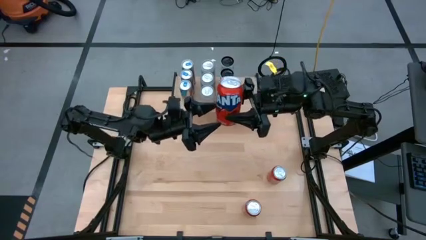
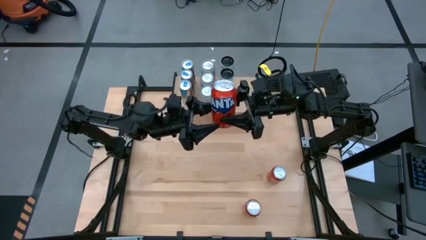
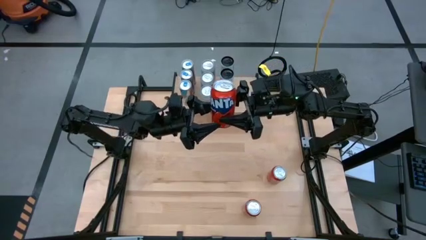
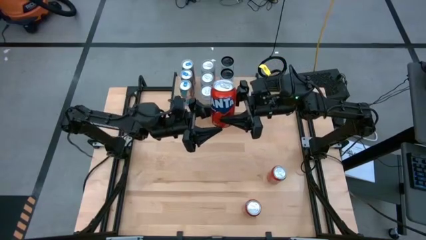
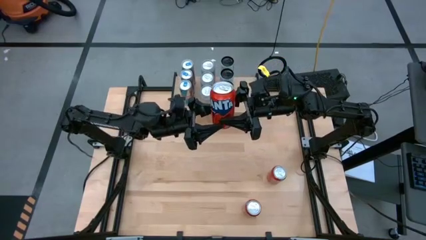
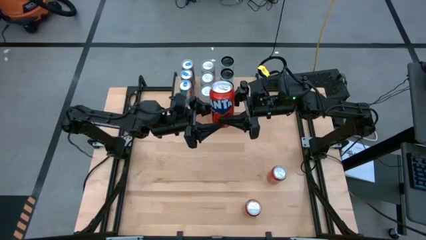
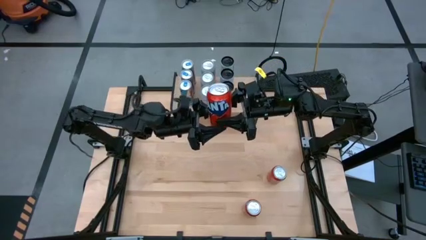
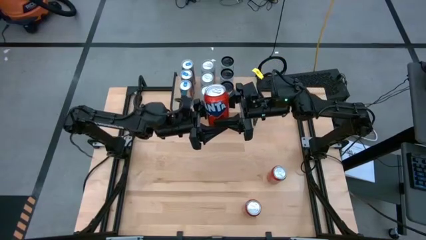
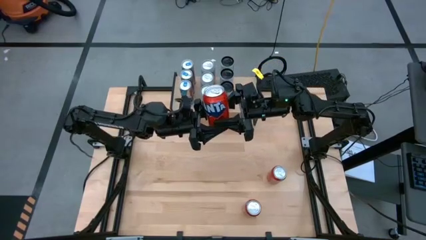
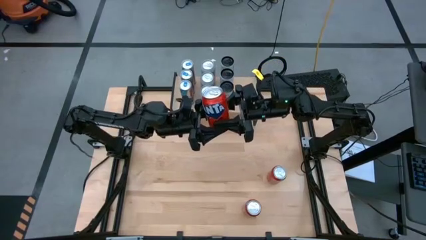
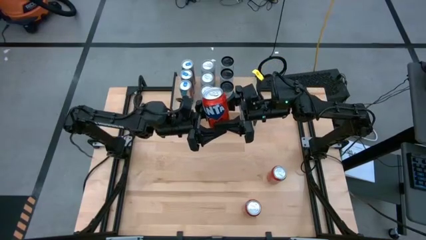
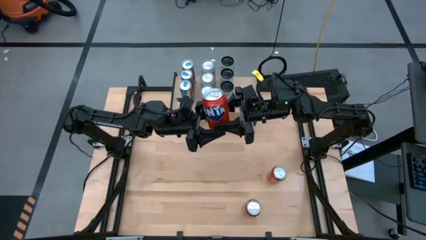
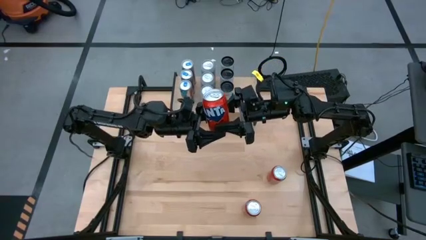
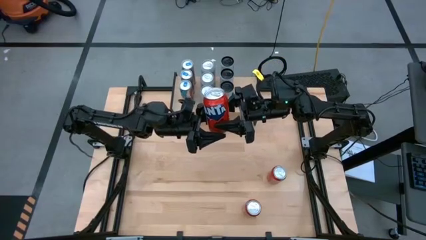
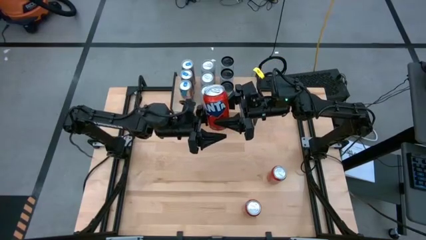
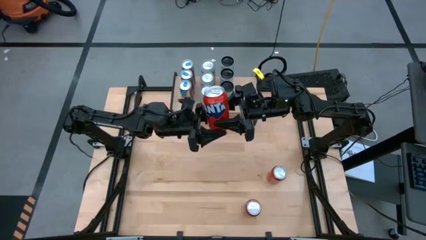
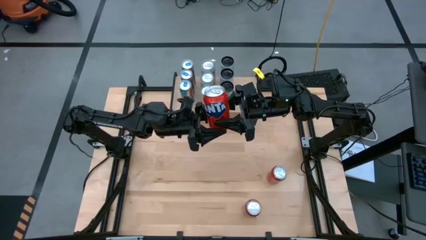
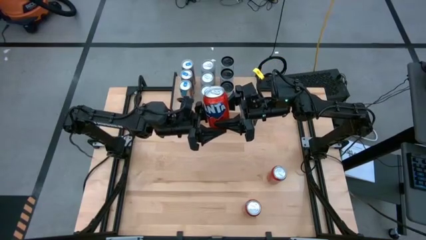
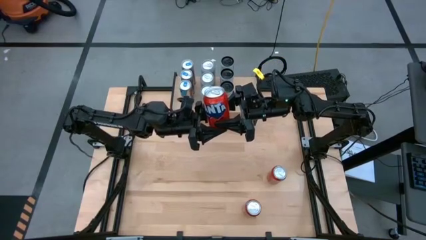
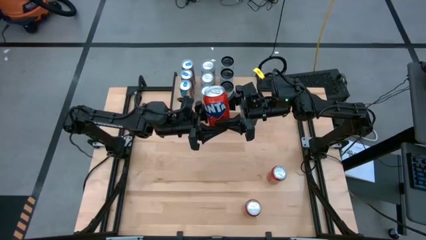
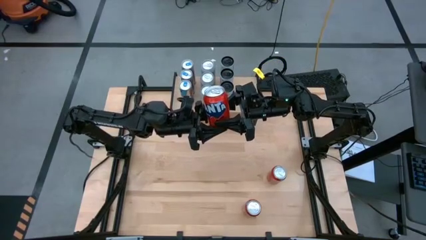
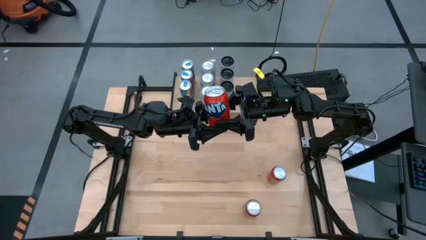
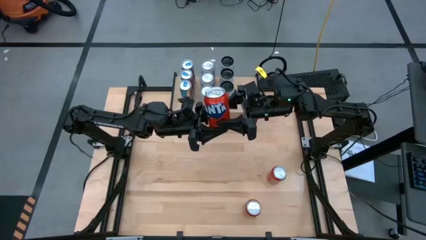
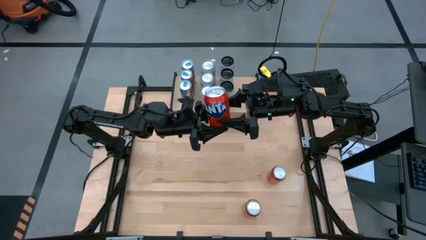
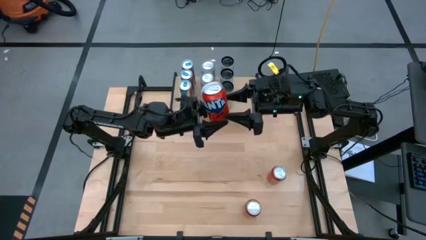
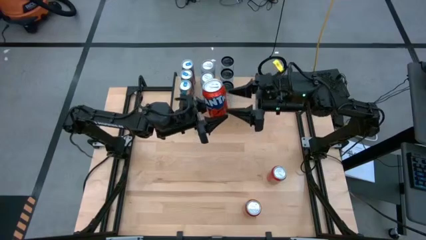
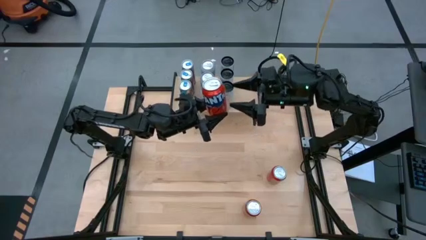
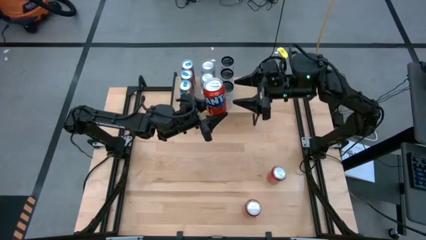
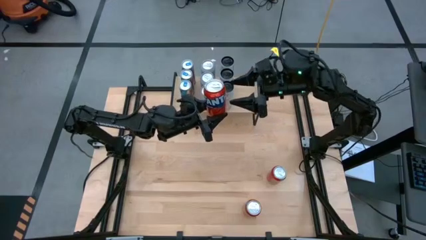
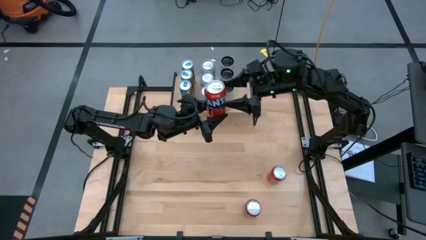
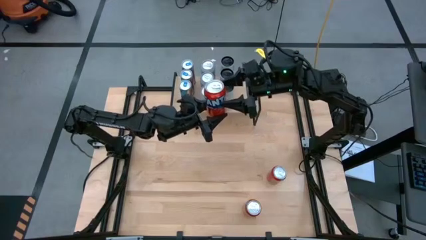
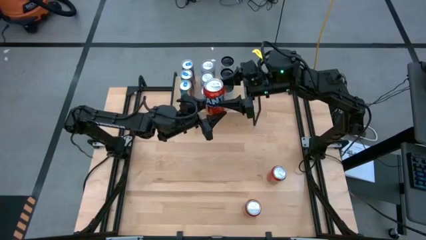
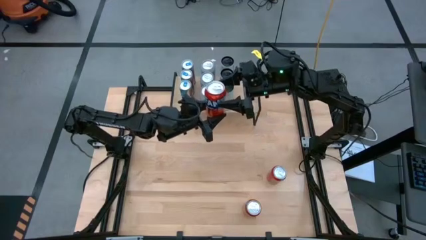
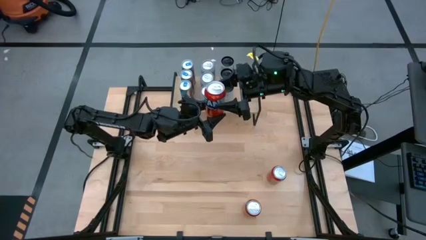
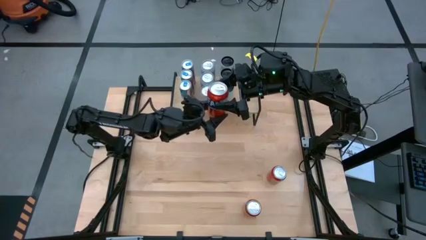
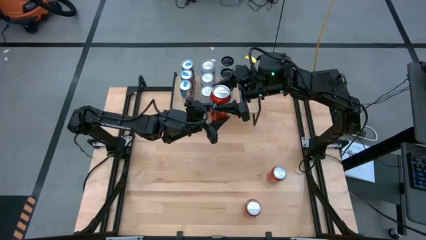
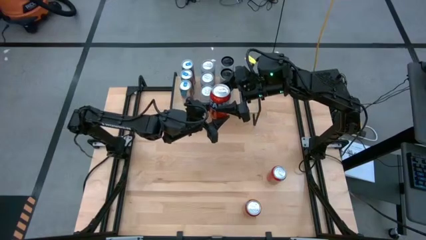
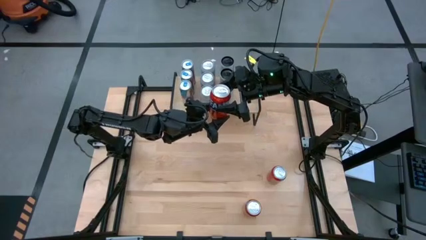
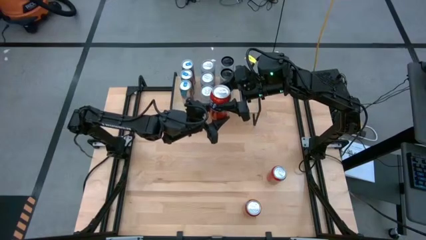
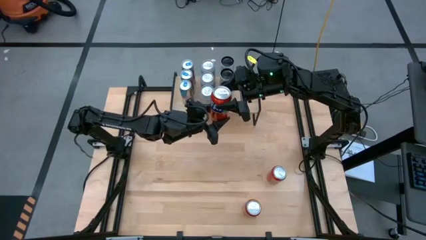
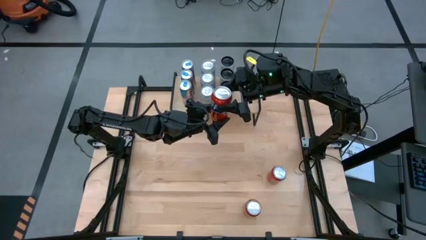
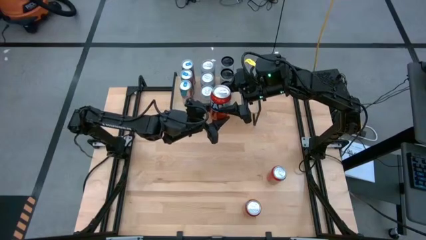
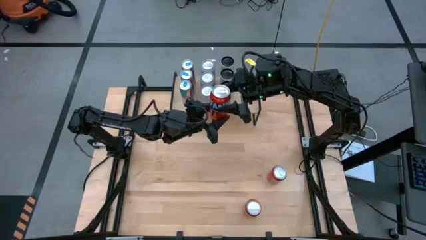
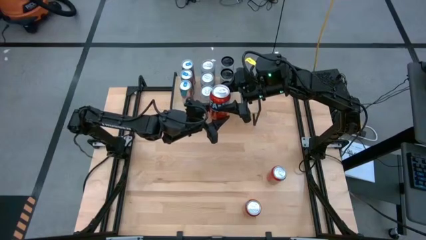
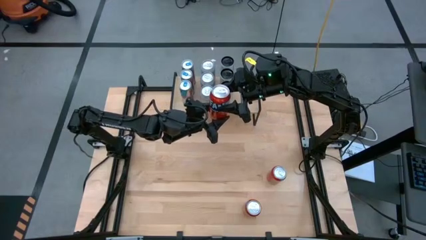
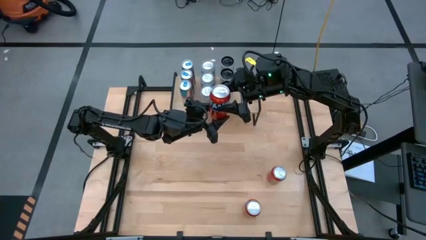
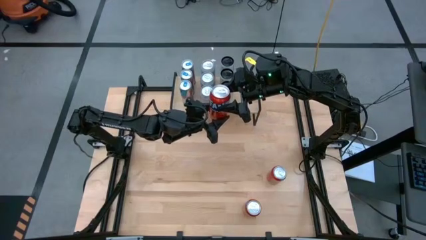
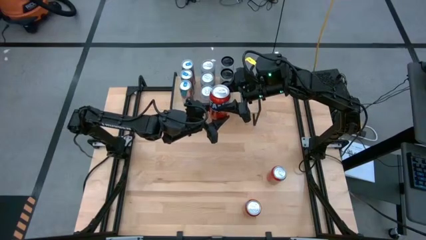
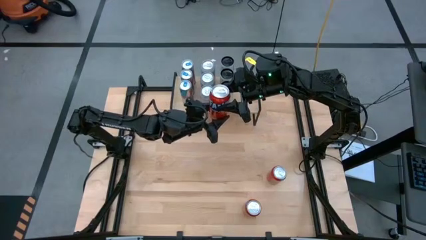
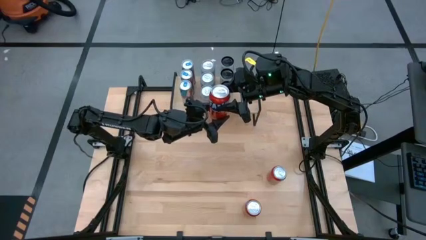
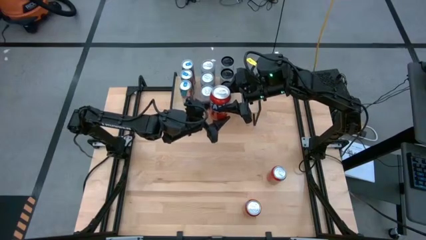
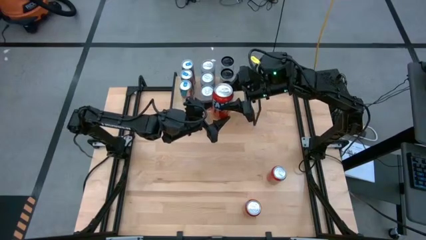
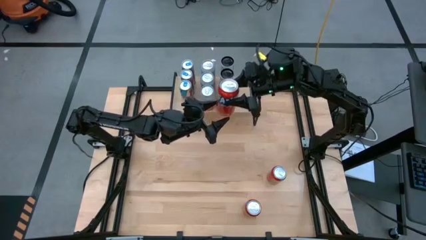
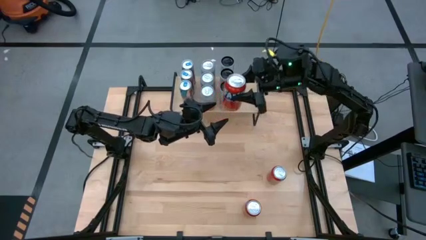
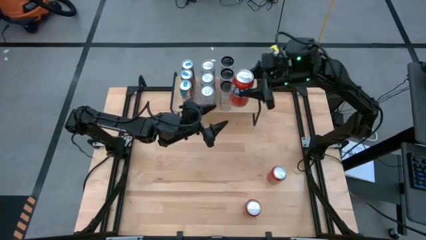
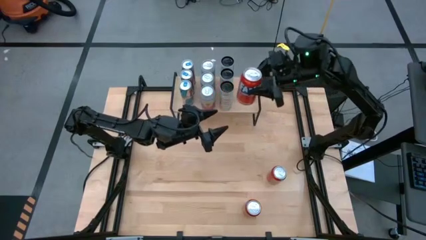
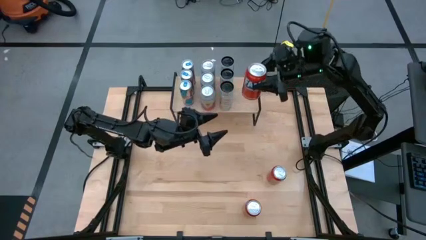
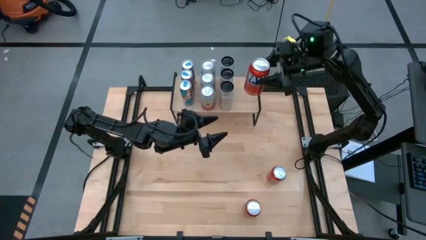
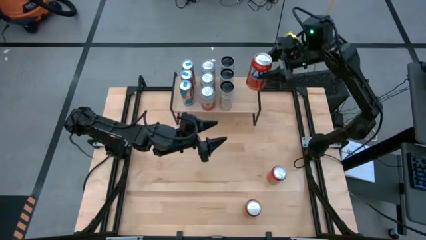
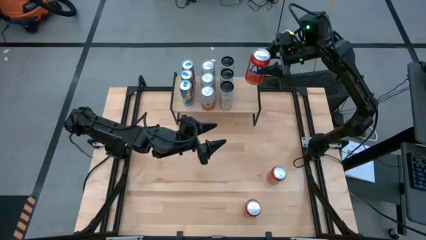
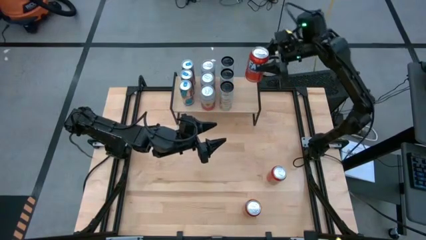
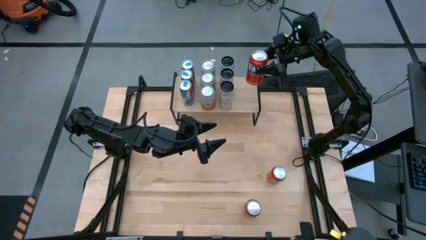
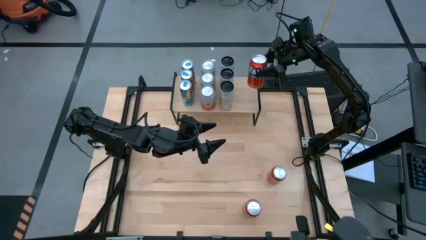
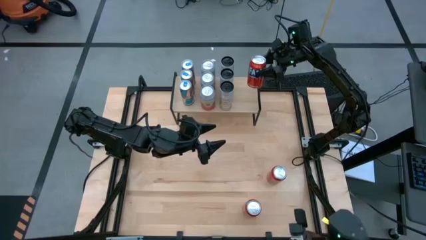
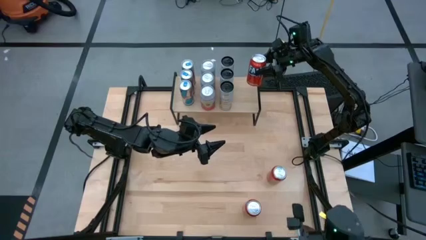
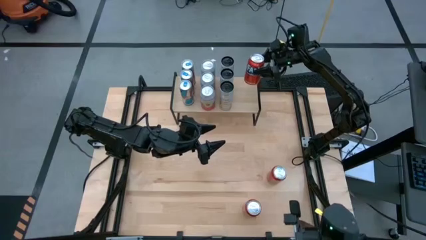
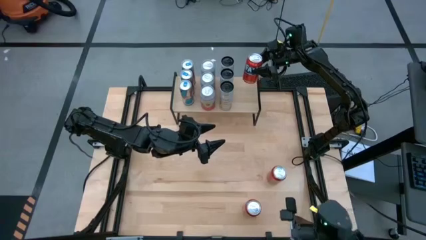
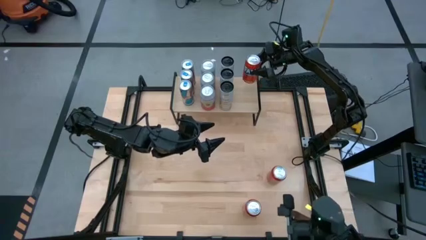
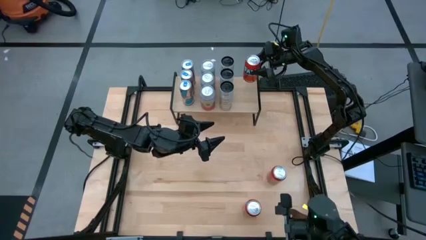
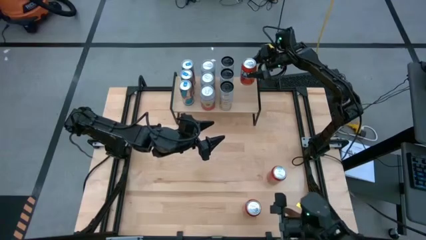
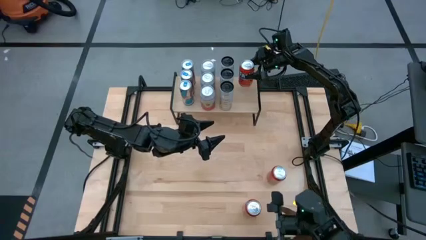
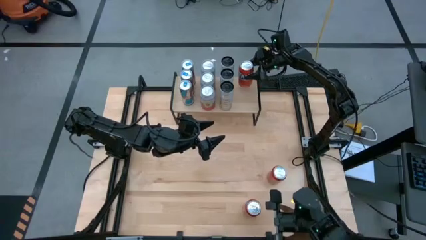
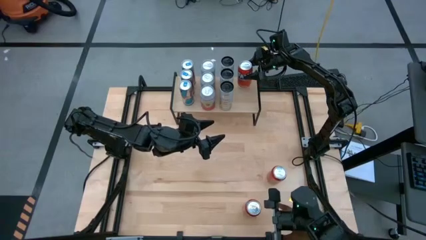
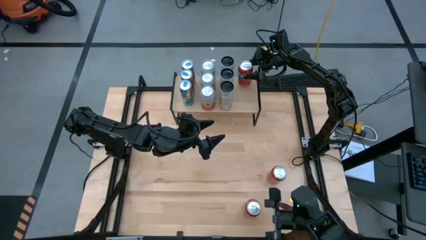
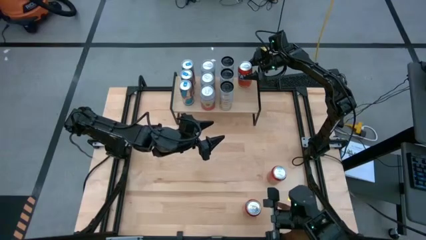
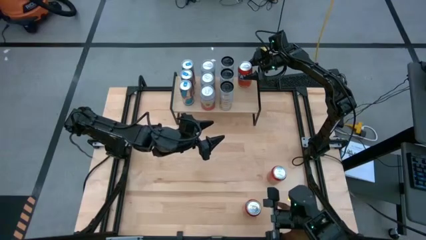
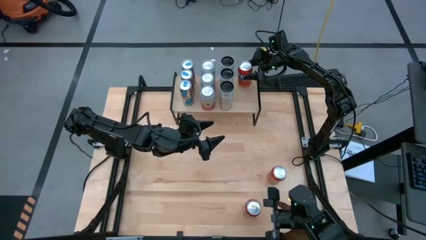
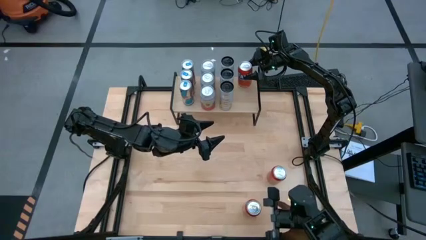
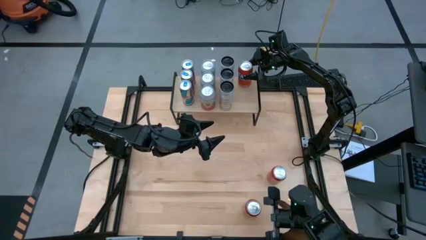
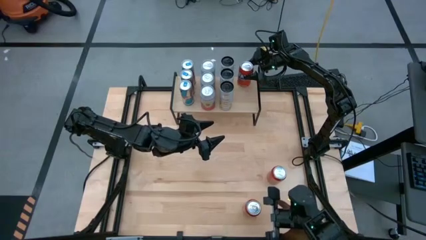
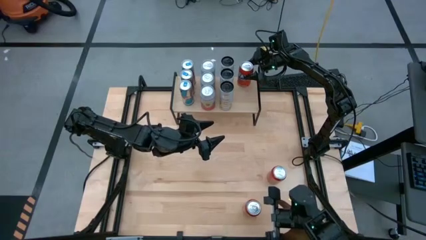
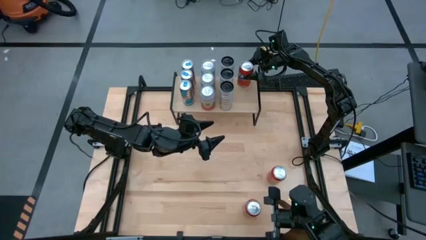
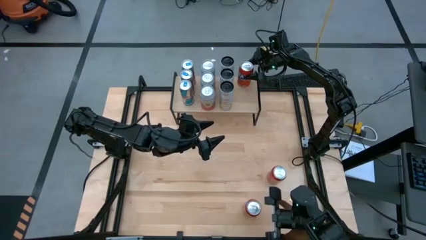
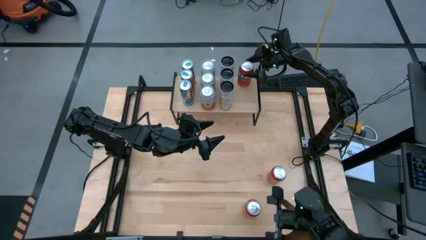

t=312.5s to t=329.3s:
Task: Place canned beverage on shelf
Put the top left red soda can on the shelf
